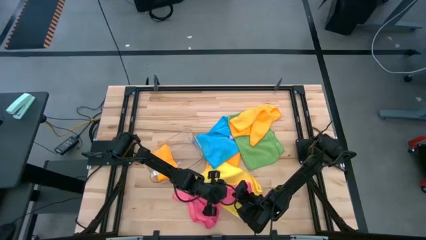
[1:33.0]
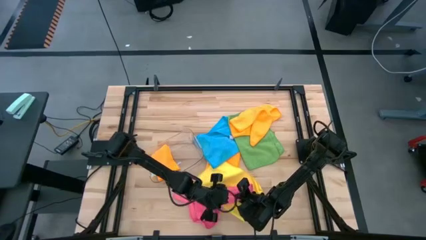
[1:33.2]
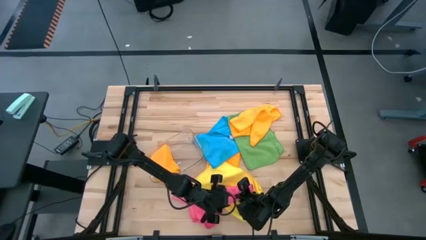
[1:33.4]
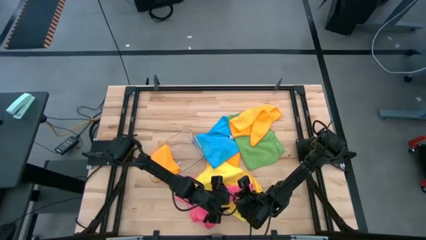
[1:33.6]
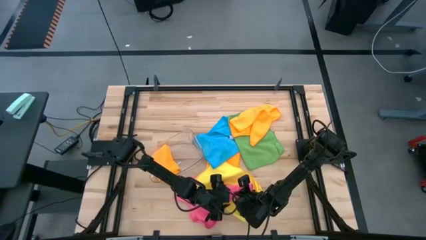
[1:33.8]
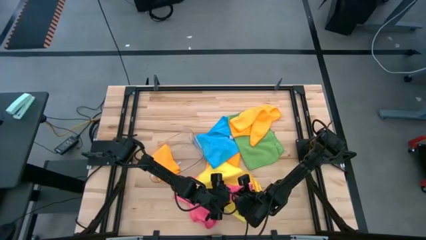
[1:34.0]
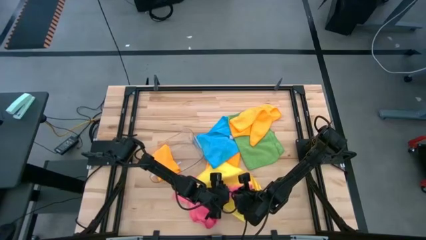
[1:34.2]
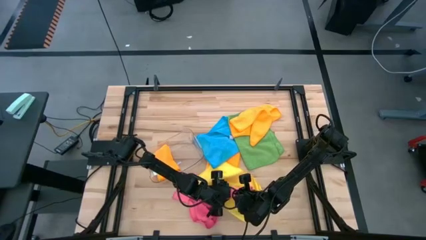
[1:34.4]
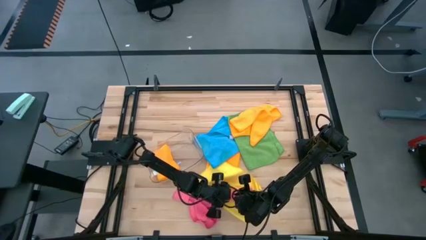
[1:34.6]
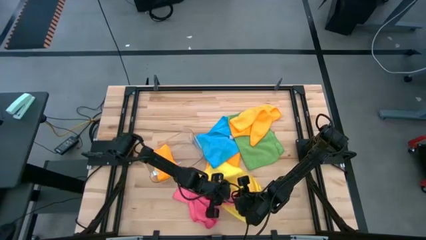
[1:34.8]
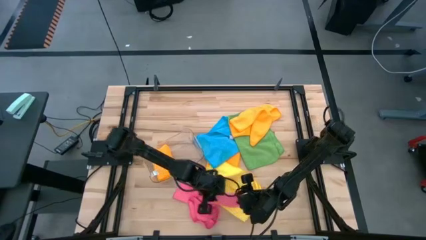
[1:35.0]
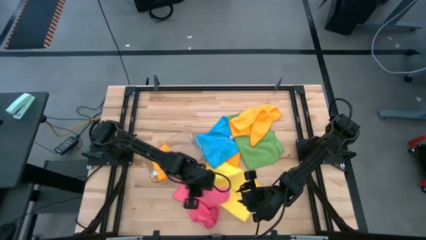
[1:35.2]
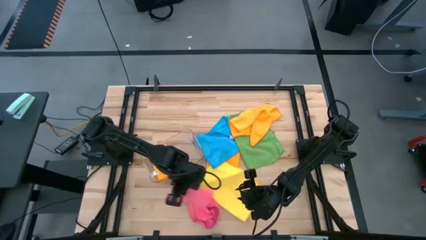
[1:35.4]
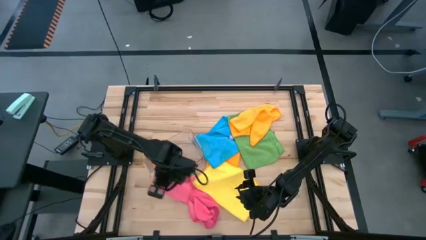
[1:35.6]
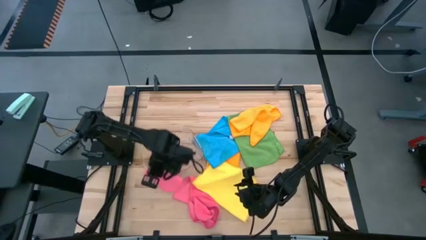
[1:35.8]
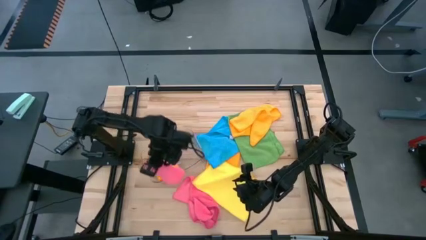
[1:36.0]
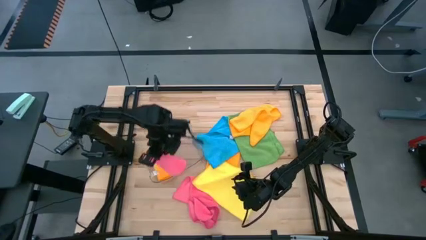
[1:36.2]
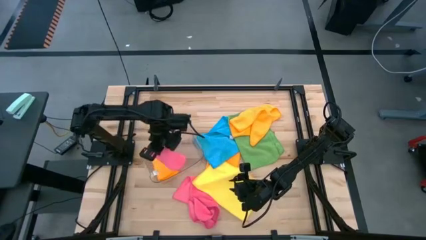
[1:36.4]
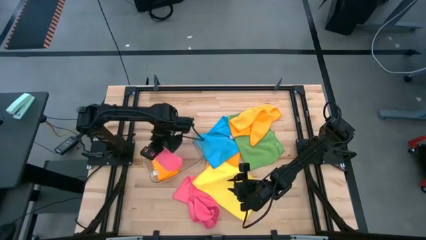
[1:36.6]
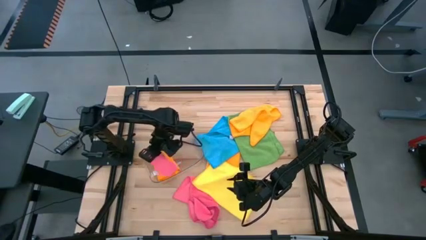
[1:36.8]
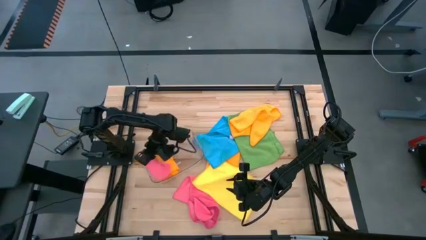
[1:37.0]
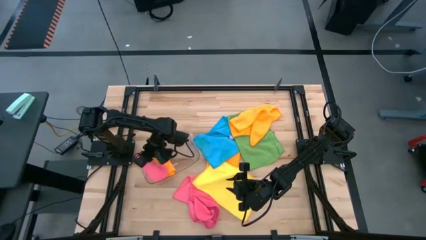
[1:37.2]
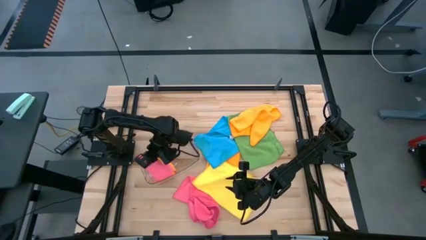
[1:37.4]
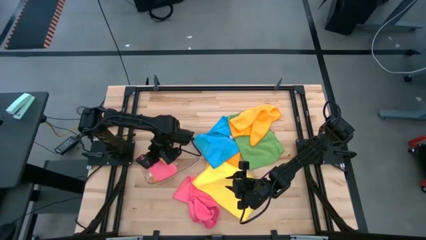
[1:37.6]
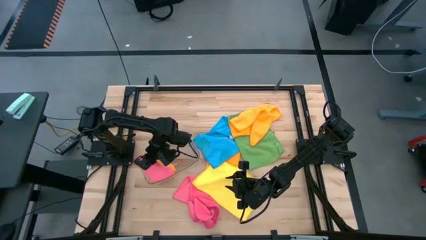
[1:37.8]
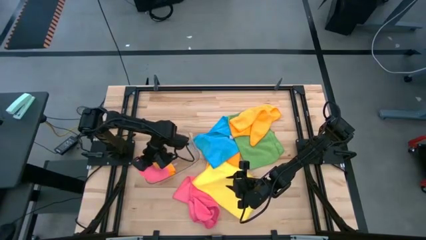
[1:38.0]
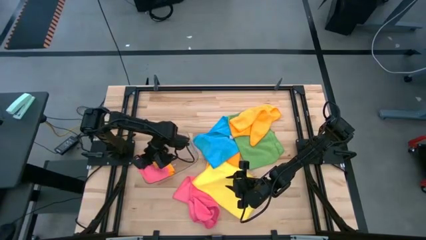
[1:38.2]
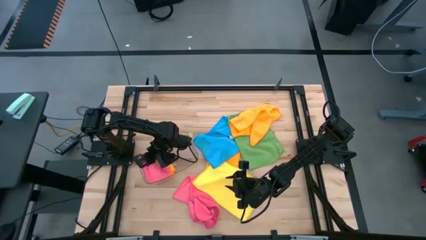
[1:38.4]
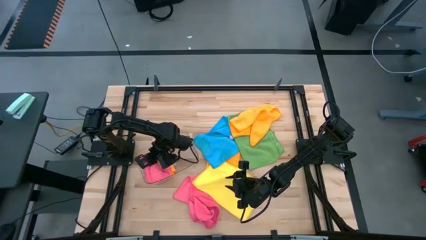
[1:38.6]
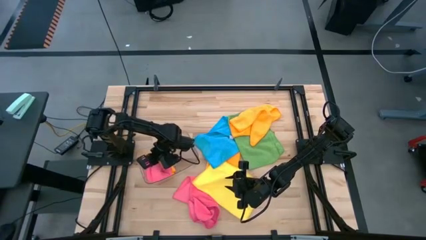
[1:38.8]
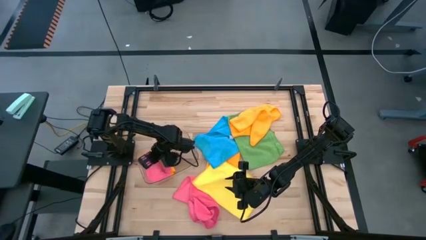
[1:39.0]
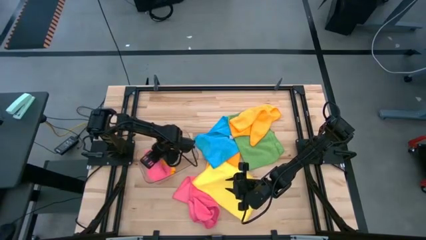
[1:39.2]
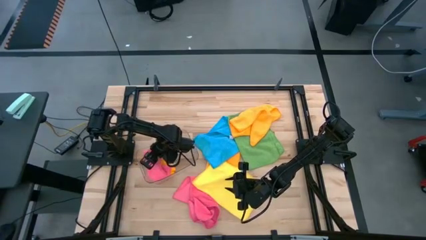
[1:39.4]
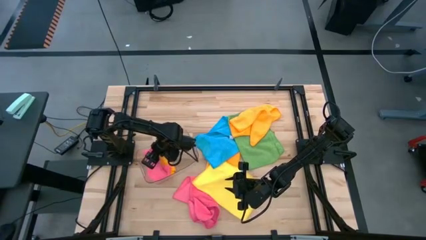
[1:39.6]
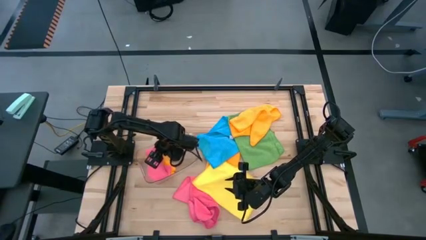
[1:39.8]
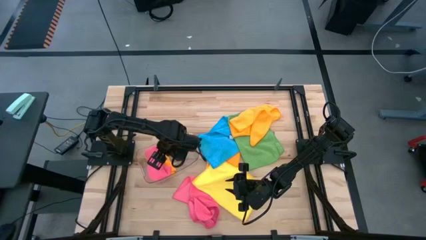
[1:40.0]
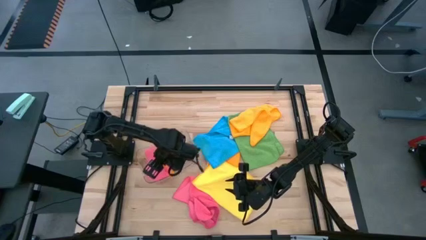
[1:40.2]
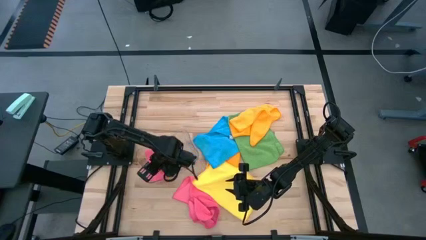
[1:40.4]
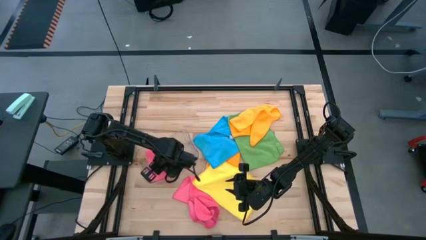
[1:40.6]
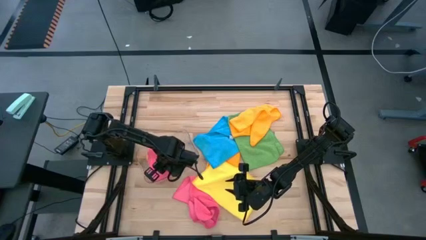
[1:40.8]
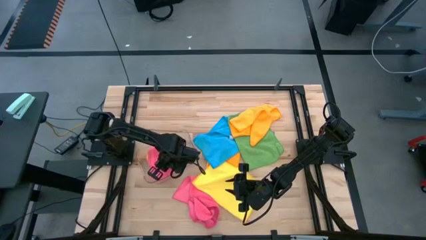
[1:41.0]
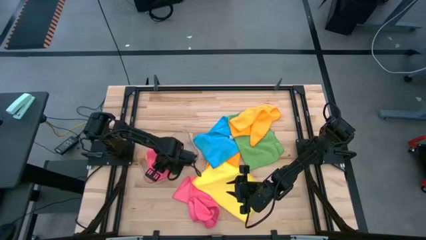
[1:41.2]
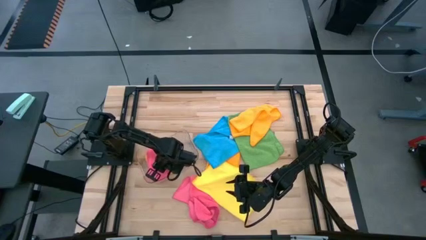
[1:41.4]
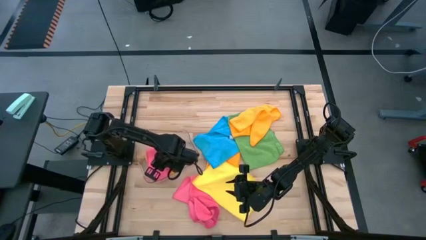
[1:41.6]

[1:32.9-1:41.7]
Task: Fold microfiber towels
Put the folded pink microfiber cloth into the transparent bin

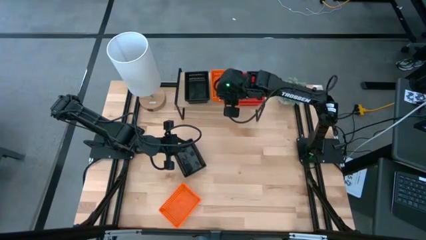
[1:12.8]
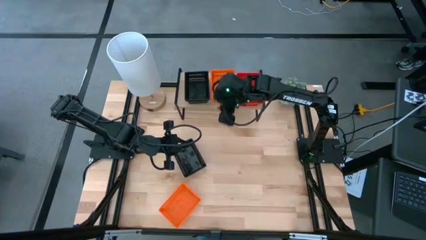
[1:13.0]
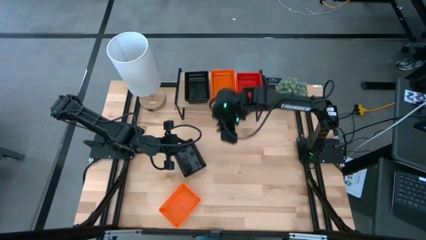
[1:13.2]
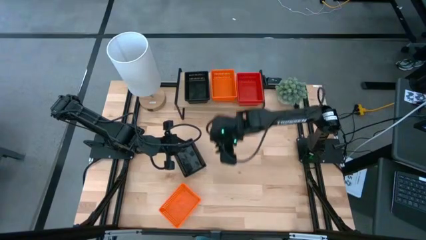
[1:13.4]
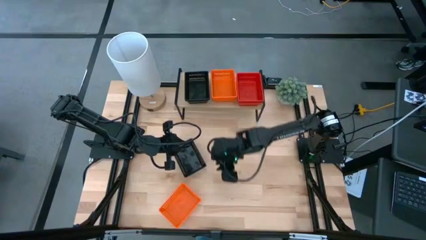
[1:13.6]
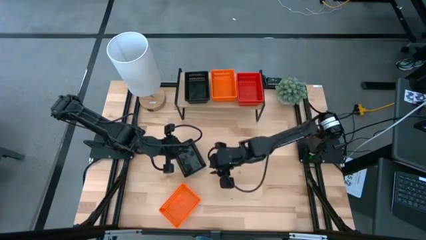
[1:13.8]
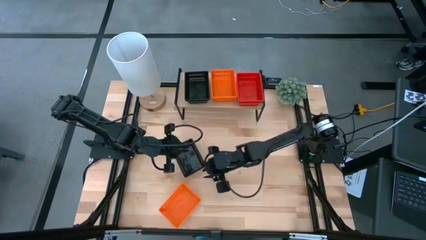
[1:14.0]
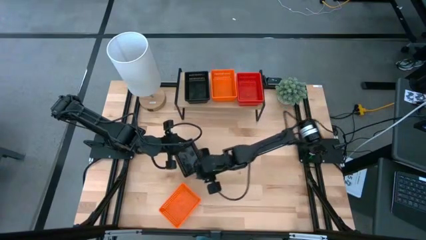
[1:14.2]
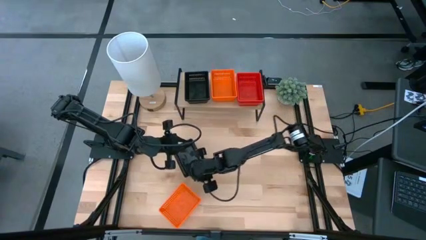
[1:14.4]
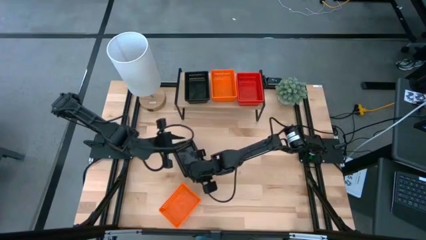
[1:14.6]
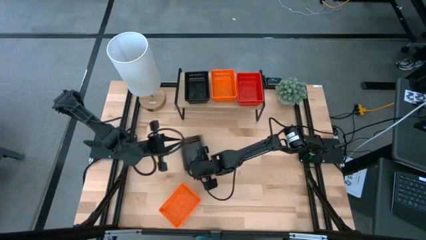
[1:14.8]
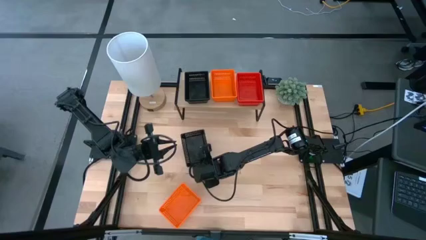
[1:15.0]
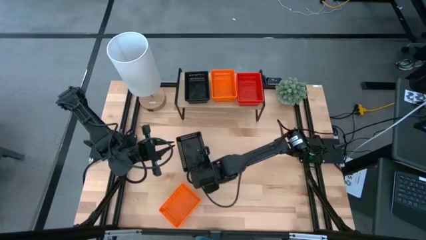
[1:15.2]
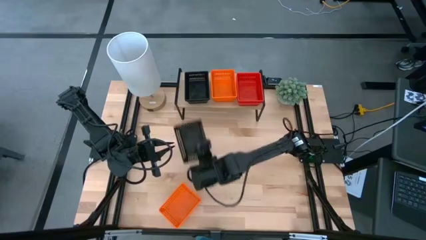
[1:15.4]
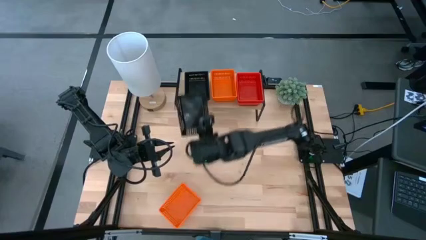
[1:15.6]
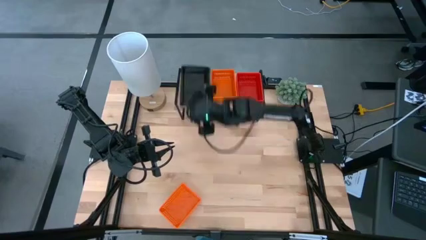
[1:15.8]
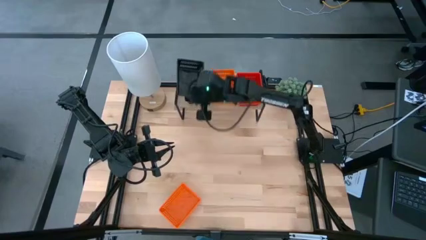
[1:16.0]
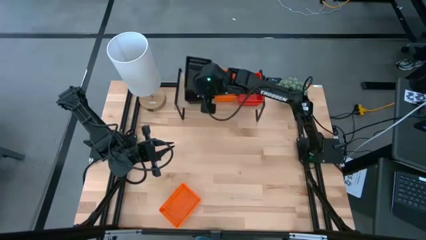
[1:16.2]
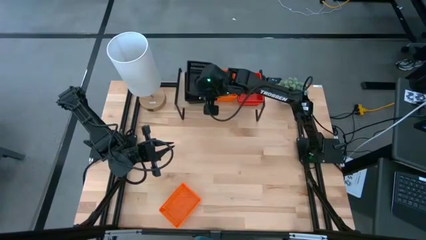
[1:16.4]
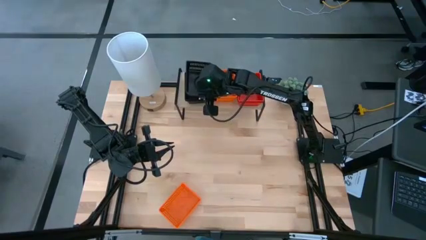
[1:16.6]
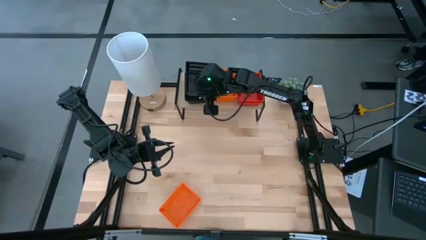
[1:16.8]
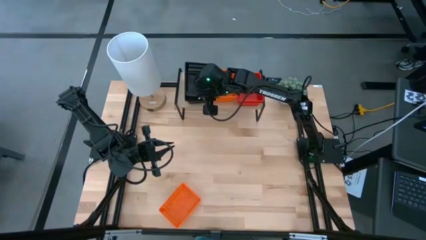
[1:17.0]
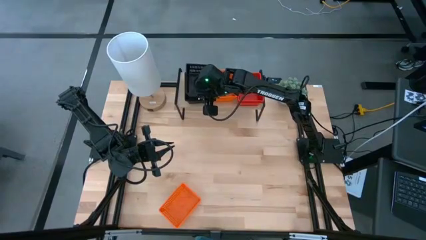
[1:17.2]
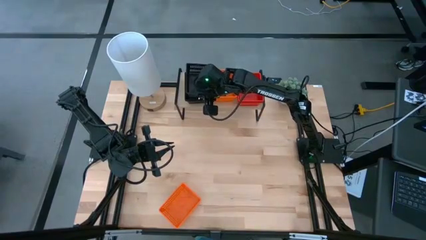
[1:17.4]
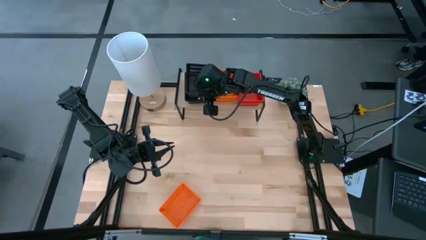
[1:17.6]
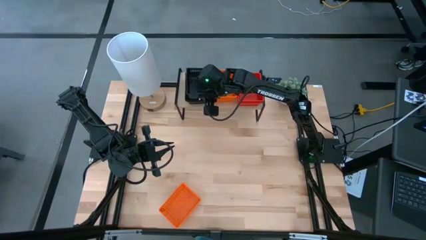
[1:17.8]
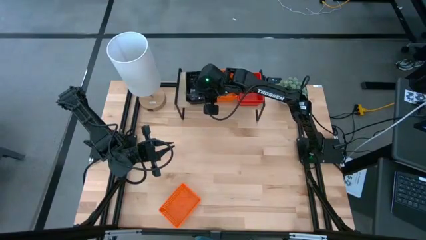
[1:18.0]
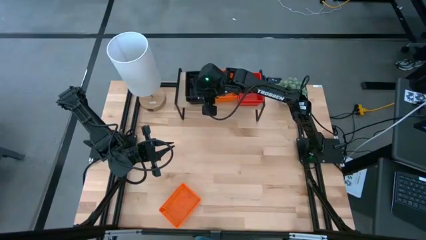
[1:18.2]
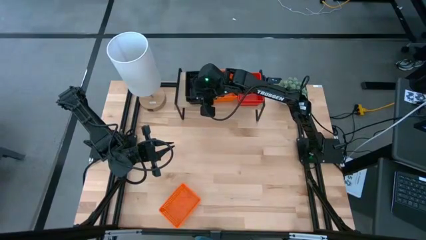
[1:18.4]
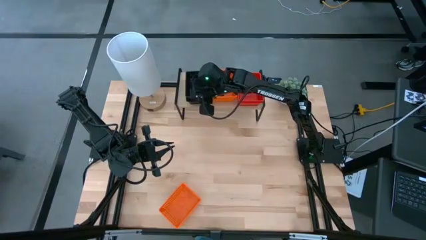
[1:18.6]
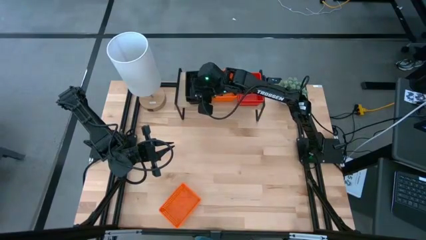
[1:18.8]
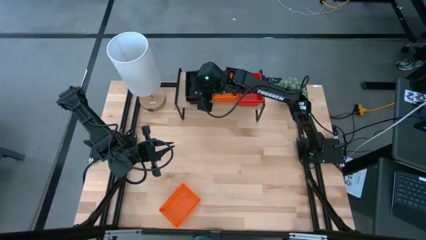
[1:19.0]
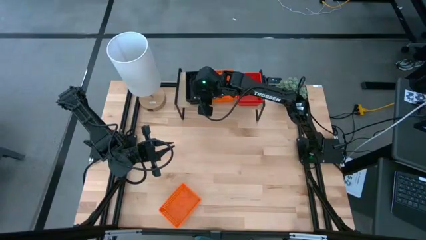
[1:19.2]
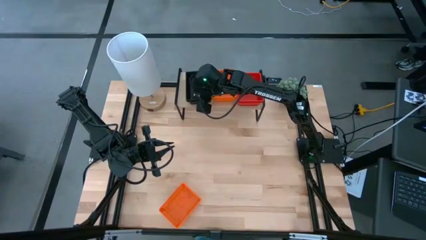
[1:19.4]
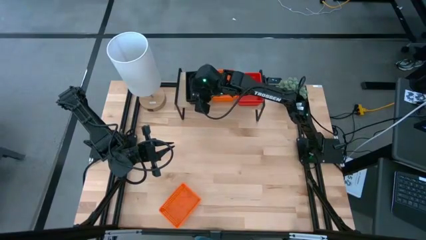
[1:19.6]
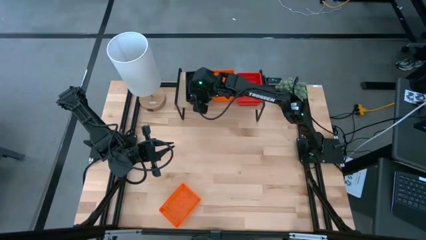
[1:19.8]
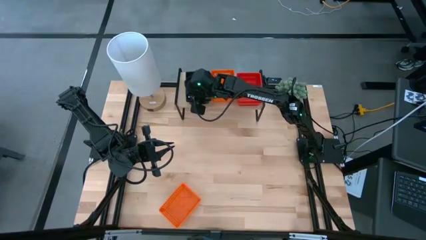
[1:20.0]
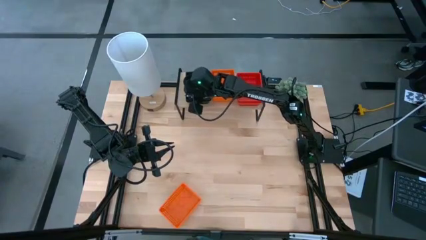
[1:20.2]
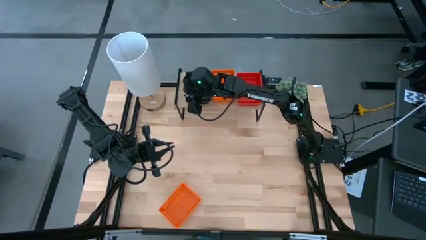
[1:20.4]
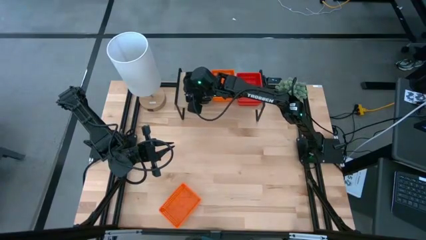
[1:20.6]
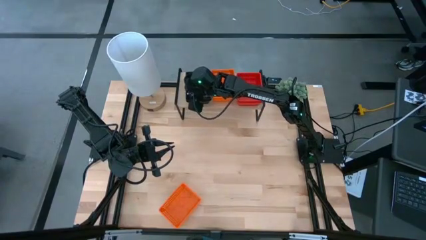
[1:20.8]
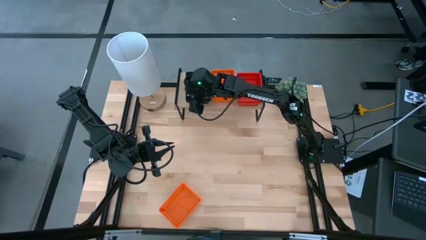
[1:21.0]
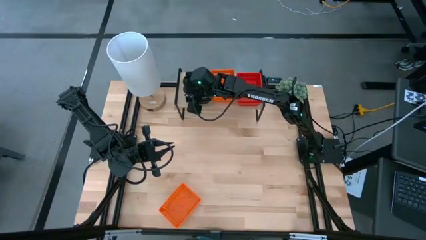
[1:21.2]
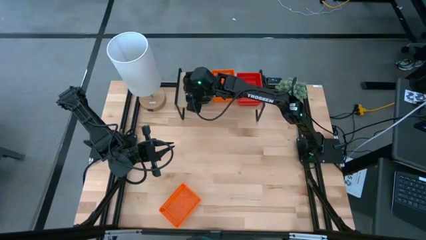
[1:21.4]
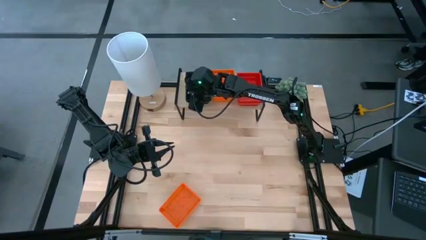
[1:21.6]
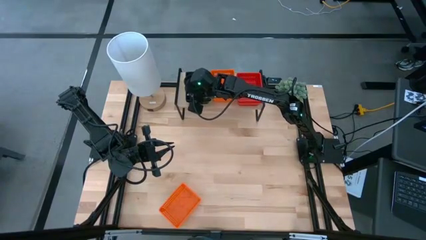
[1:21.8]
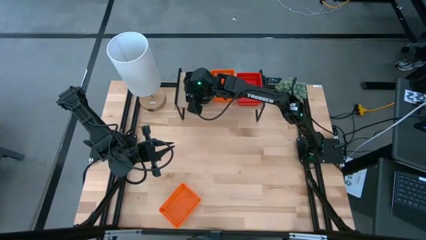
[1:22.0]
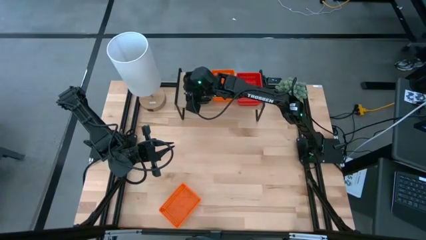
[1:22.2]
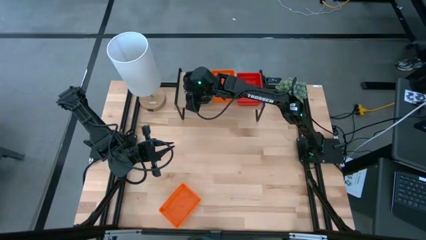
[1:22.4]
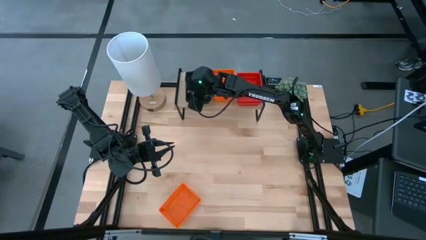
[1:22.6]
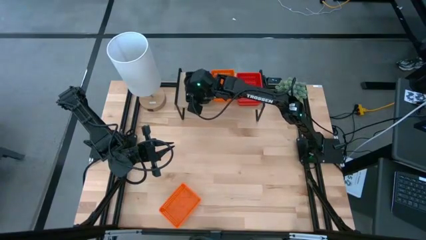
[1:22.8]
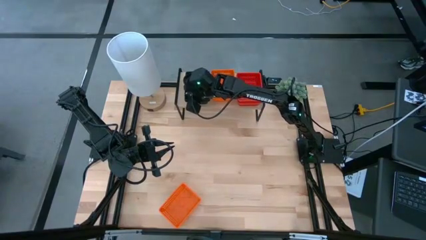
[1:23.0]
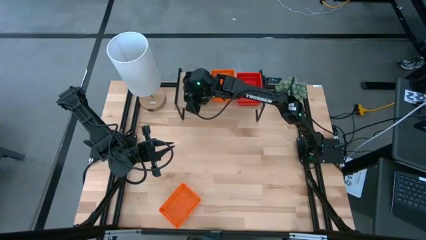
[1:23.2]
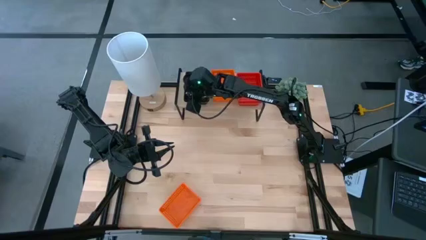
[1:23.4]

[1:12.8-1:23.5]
Task: Stack baskets on shelf by color
Stack the black basket on top of the stacked black baskets on the shelf
